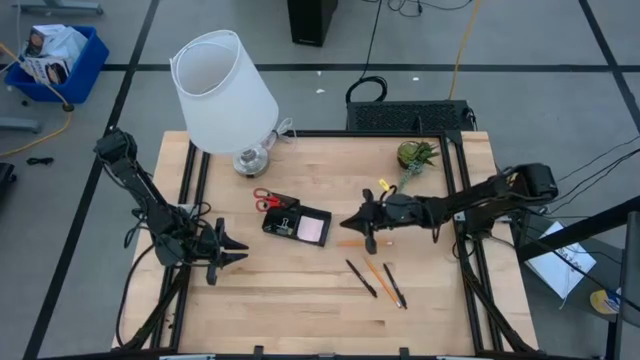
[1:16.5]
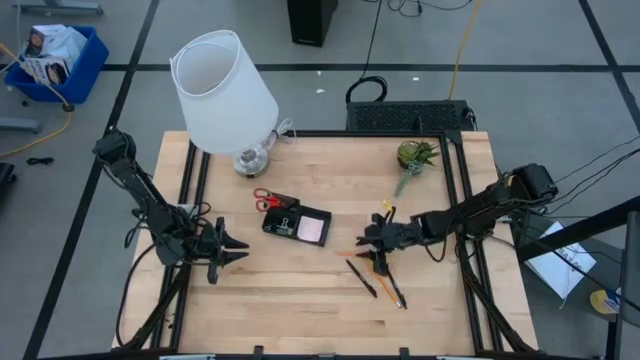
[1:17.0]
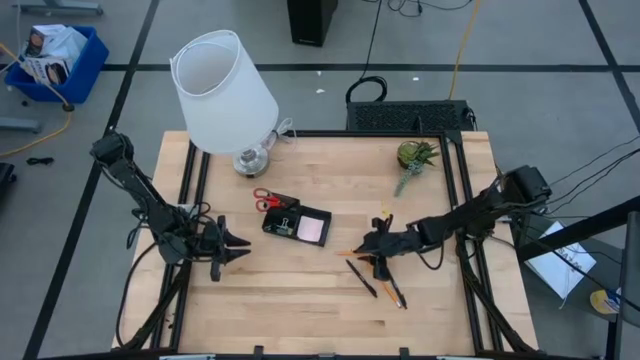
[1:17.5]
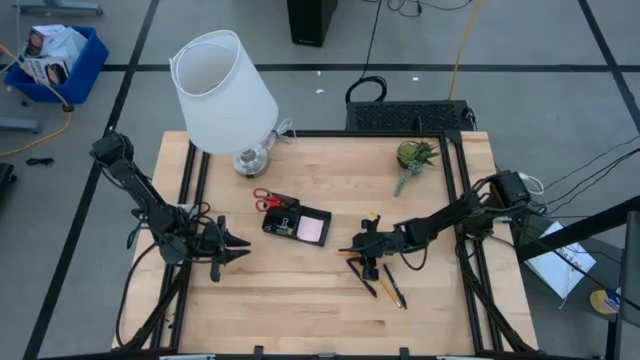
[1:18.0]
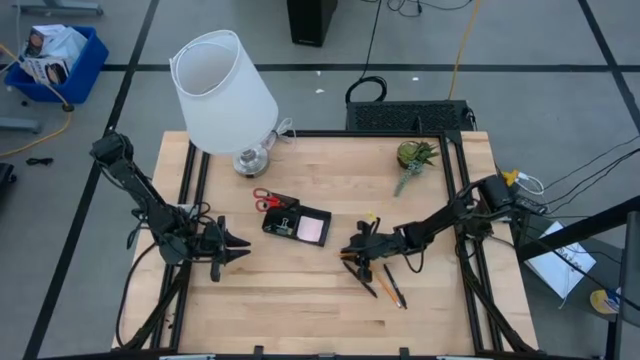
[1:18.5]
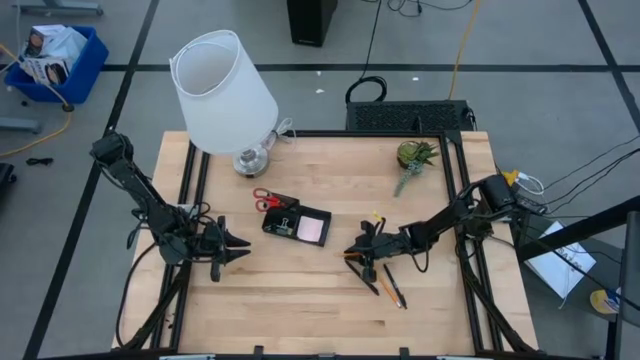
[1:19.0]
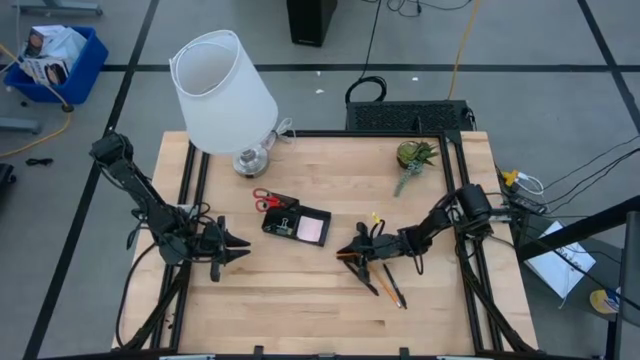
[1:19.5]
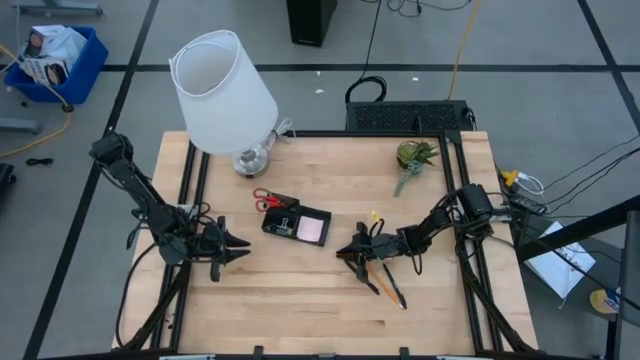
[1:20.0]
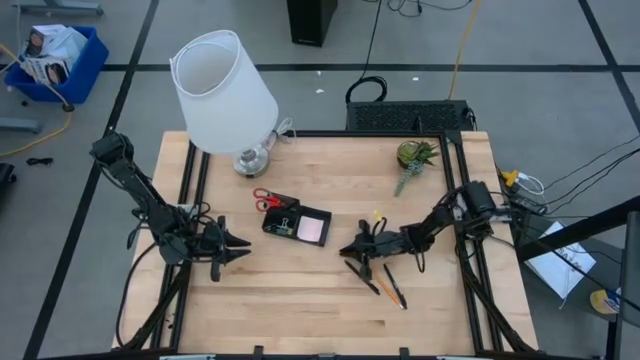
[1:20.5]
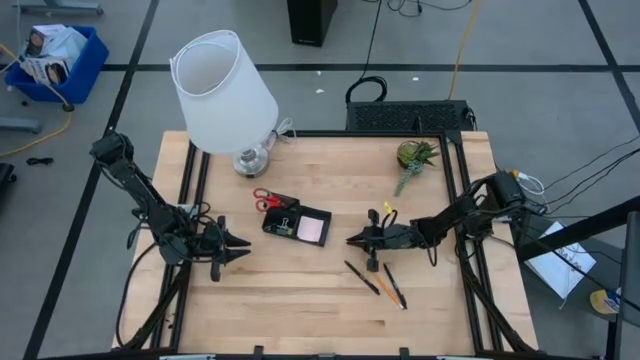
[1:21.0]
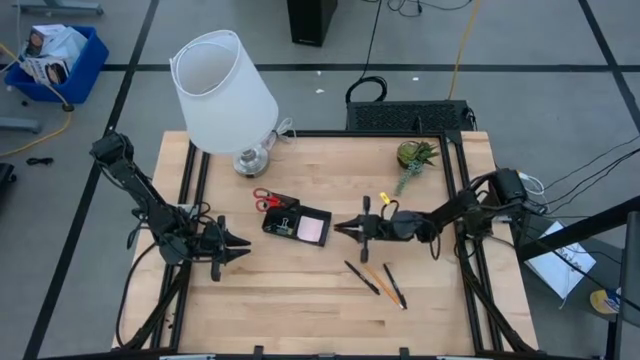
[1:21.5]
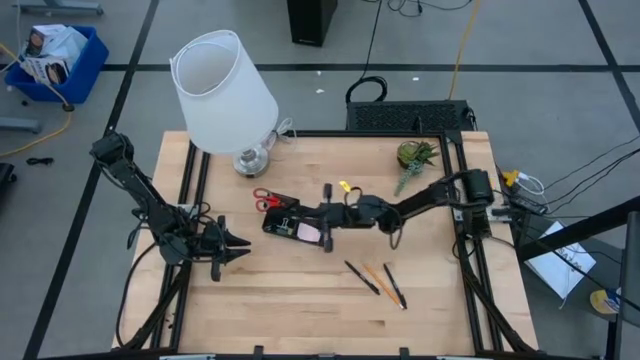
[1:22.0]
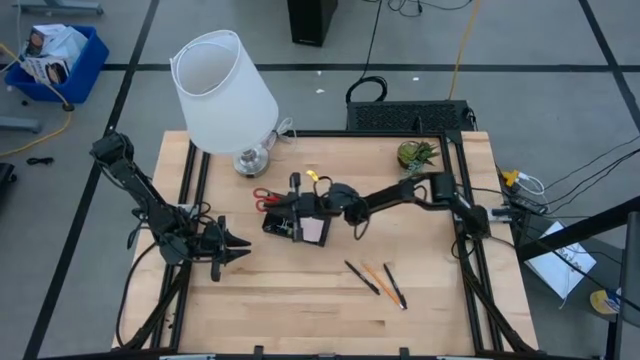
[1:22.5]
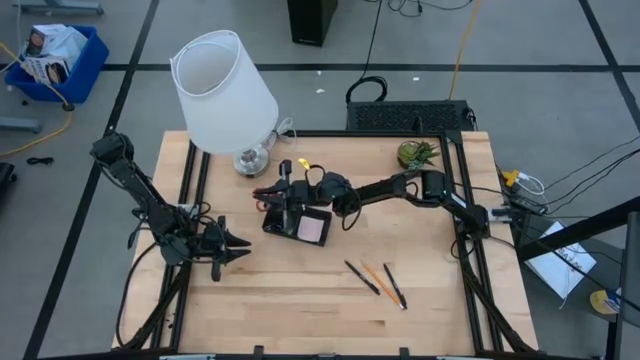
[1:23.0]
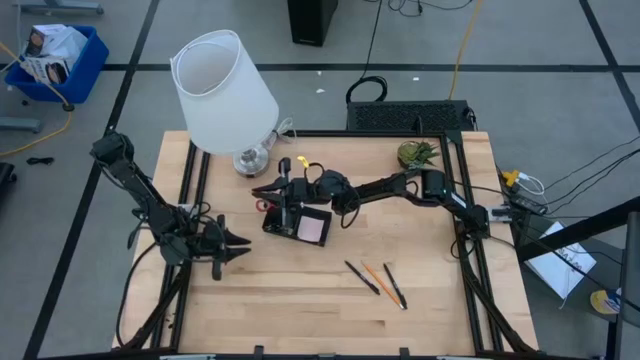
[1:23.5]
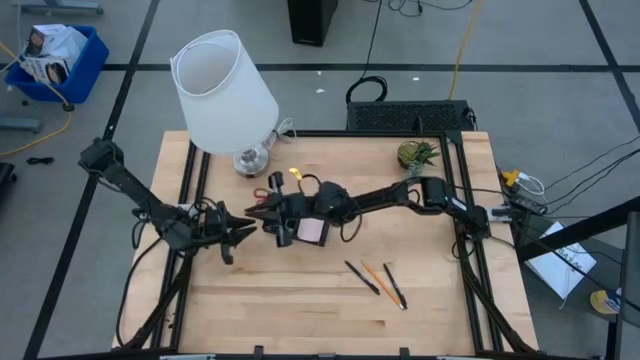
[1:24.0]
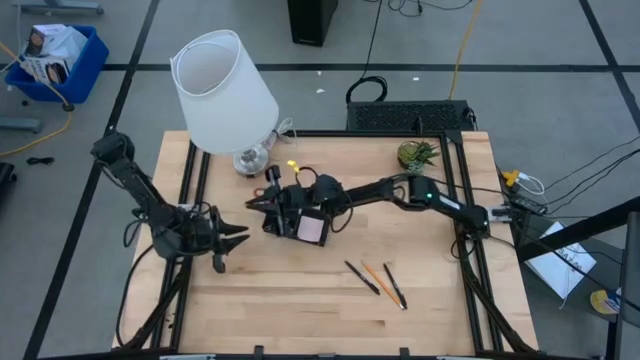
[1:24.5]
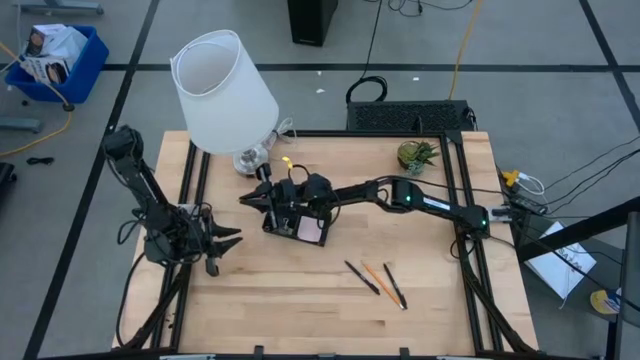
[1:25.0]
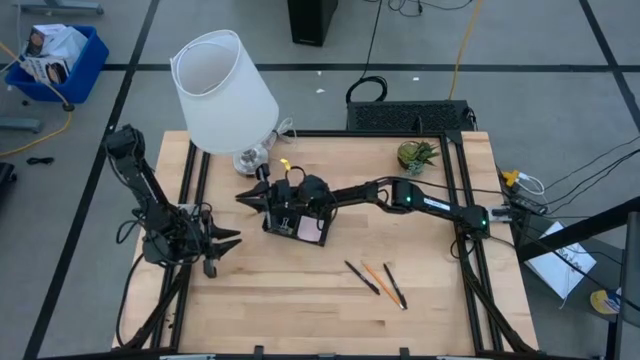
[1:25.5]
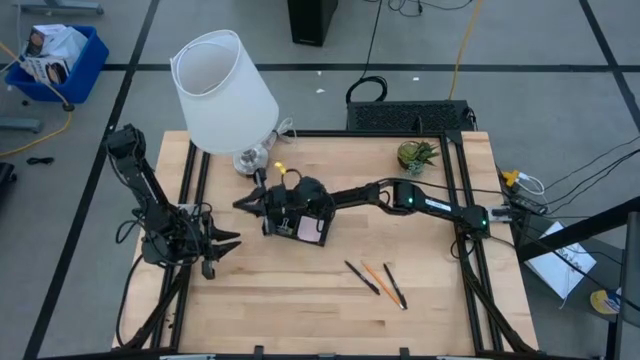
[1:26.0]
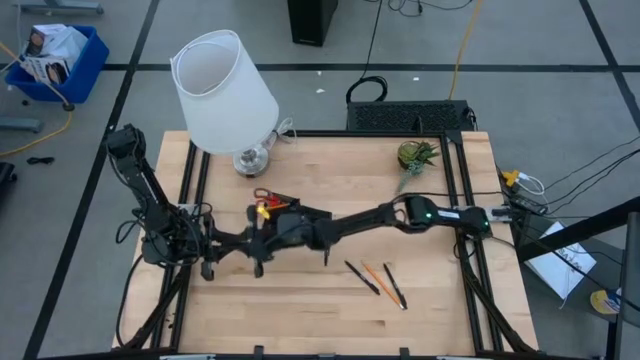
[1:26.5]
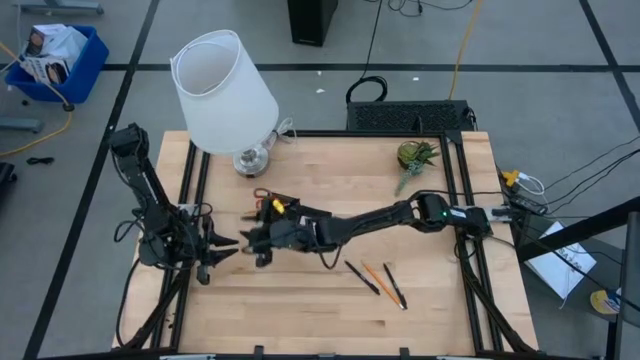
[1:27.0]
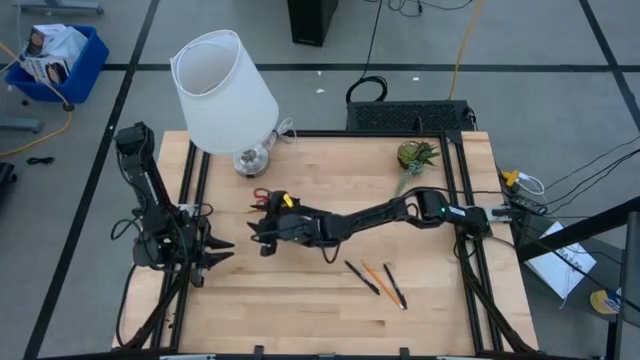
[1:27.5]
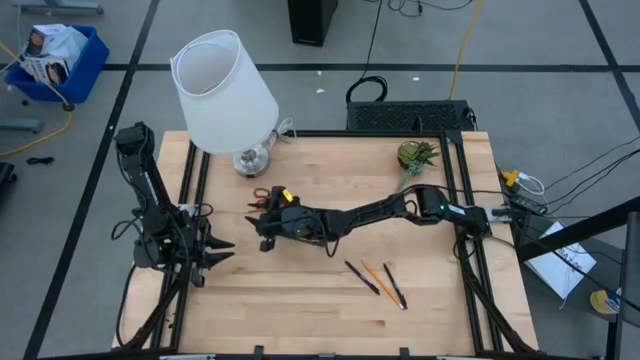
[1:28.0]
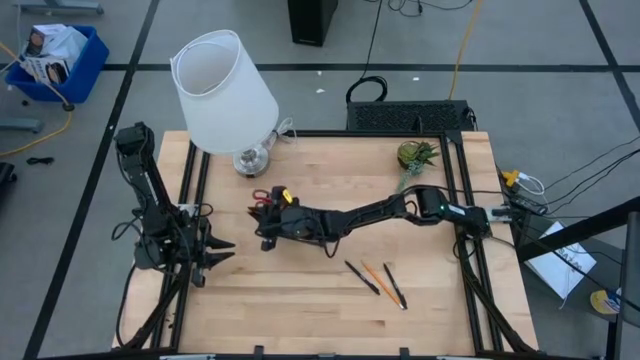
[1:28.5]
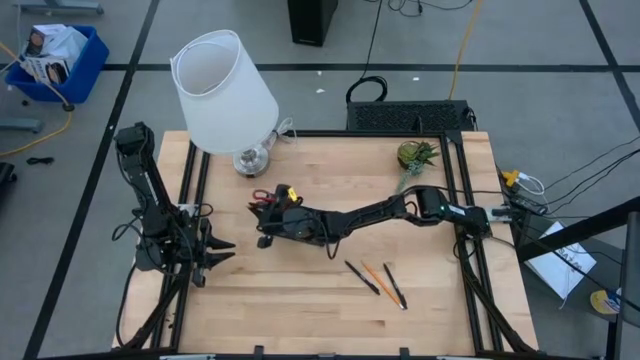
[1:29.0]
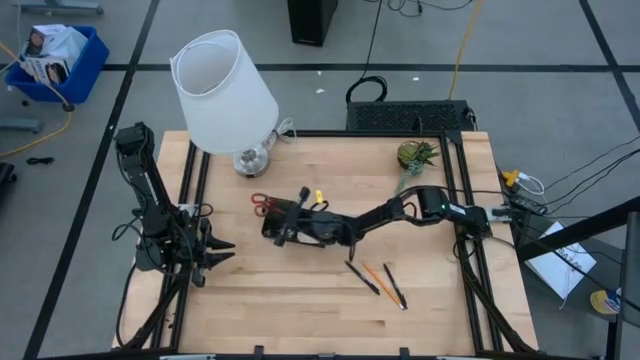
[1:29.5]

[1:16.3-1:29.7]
Task: Pick and place office supplies into organizer
Put the top orange pencil into the black desk organizer

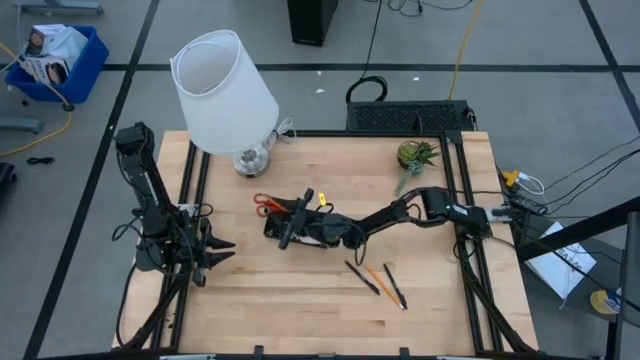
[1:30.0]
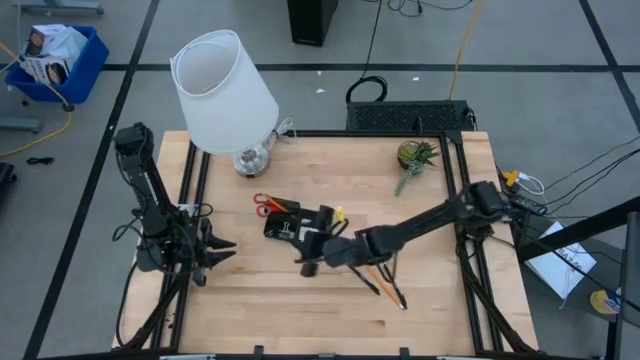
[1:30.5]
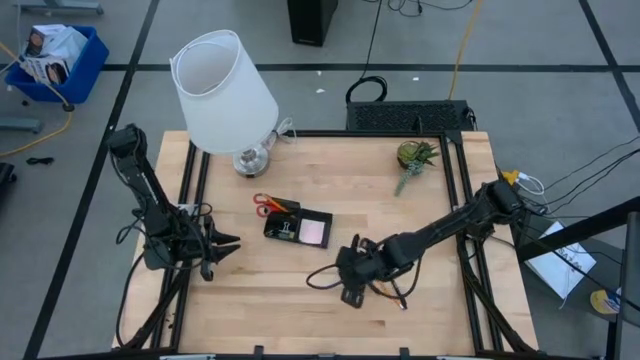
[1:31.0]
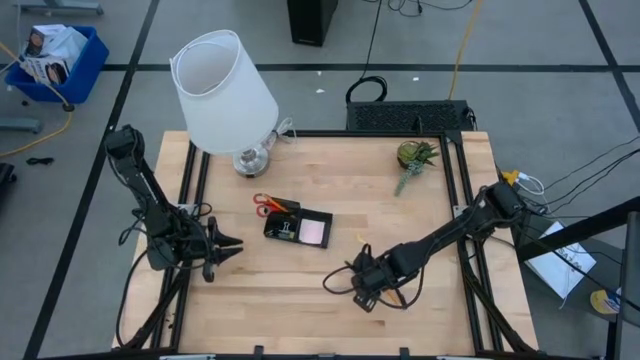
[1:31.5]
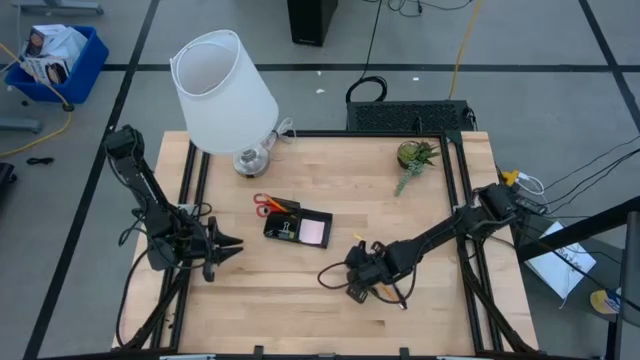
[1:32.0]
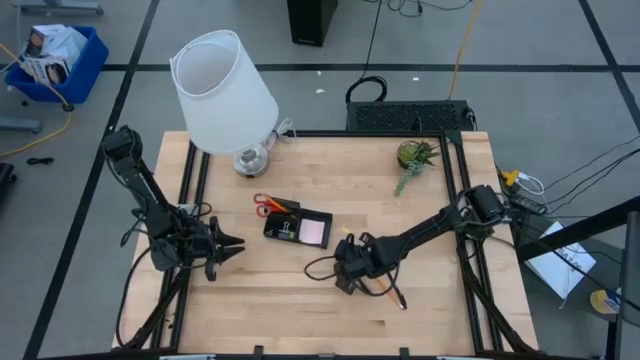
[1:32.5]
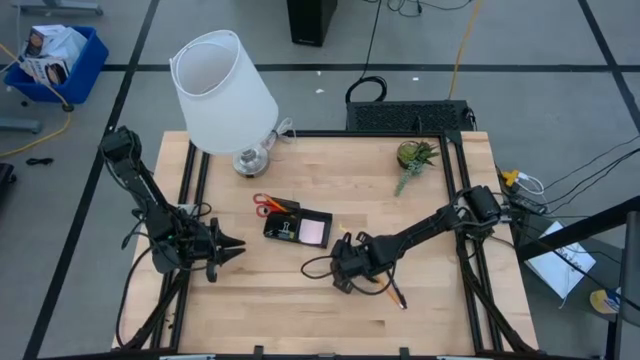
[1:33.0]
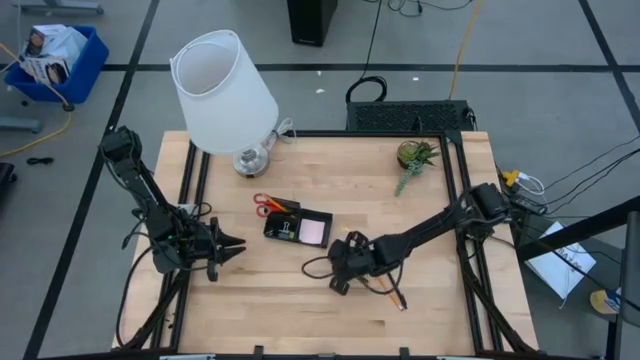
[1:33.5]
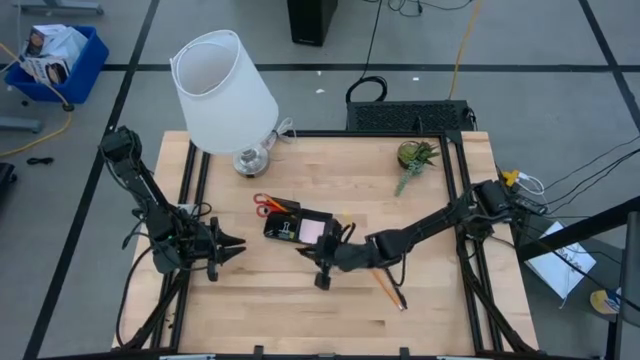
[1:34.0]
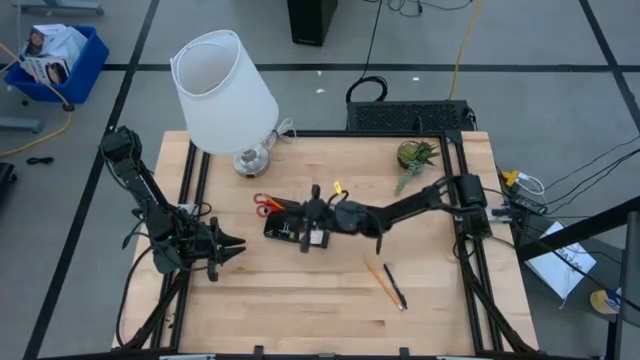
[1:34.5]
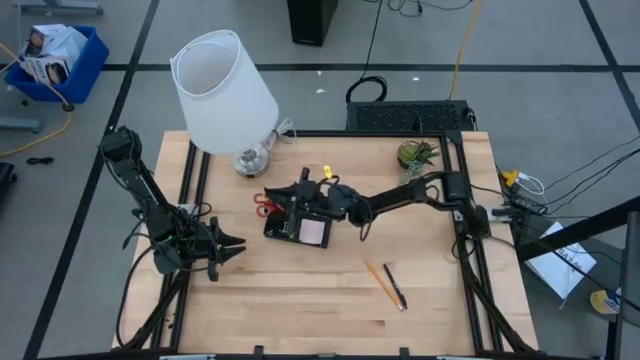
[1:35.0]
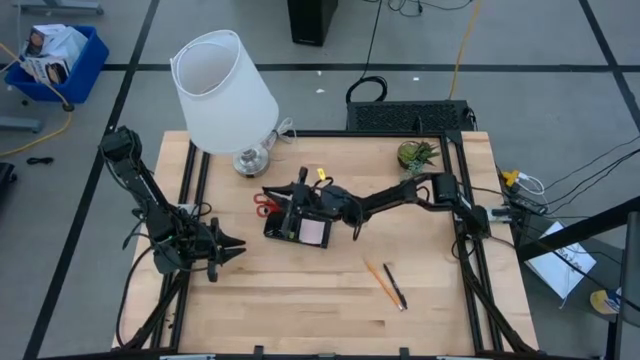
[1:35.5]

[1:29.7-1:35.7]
Put the black pen into the black desk organizer
